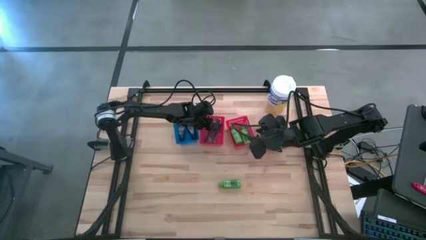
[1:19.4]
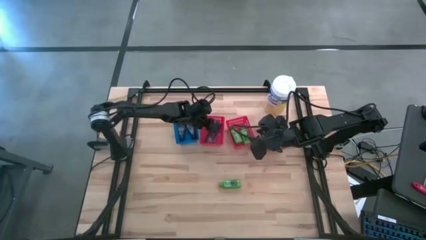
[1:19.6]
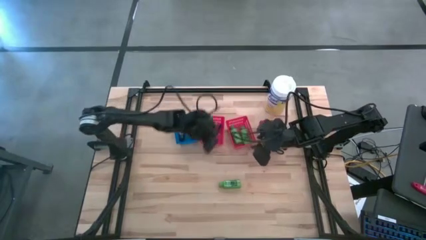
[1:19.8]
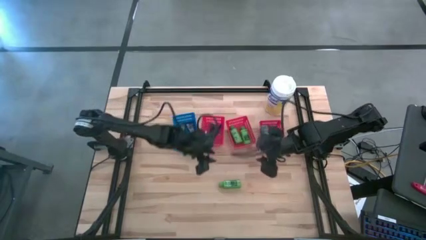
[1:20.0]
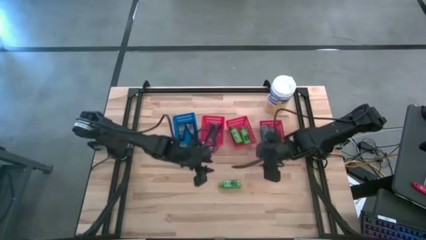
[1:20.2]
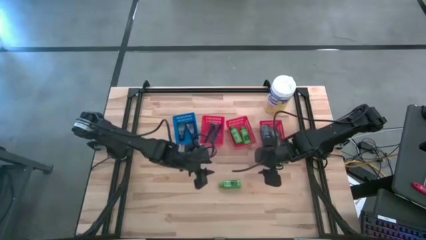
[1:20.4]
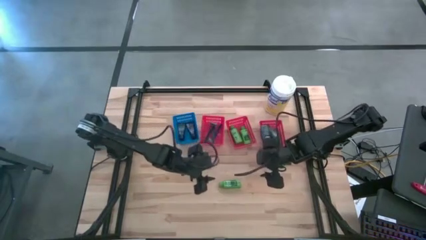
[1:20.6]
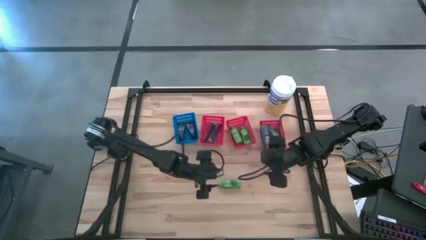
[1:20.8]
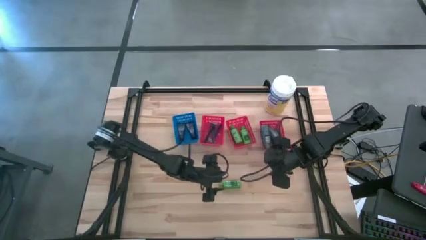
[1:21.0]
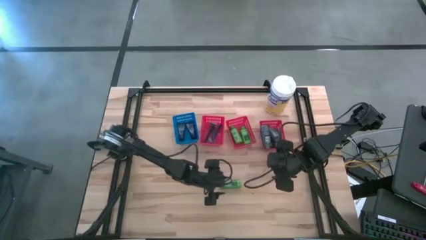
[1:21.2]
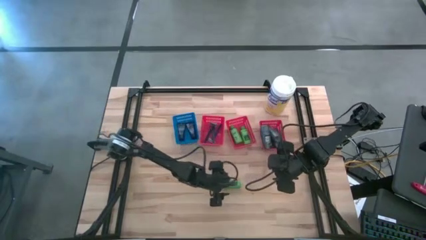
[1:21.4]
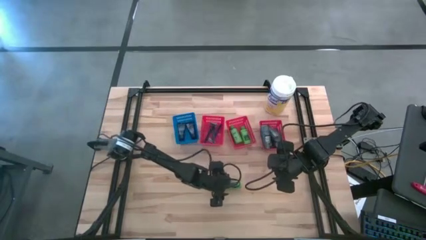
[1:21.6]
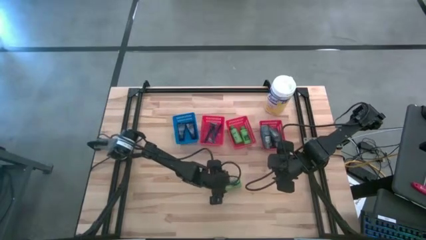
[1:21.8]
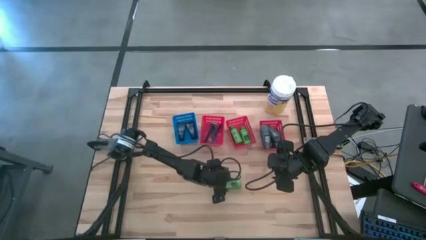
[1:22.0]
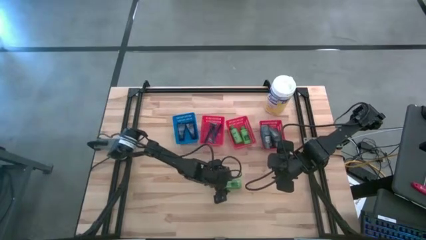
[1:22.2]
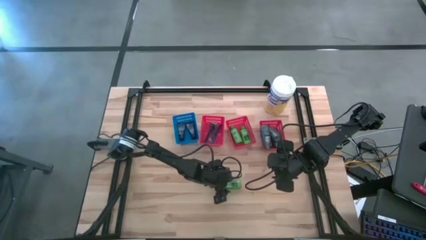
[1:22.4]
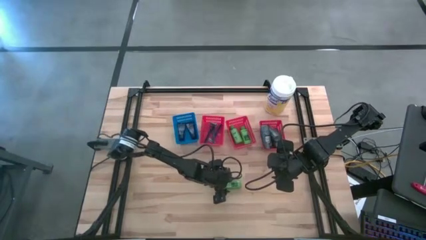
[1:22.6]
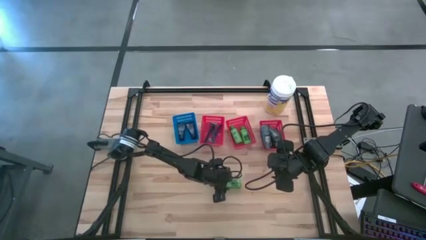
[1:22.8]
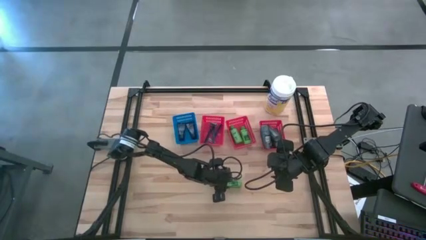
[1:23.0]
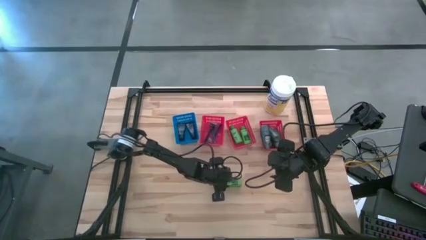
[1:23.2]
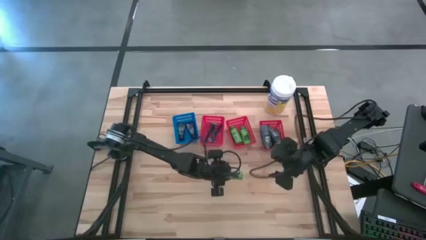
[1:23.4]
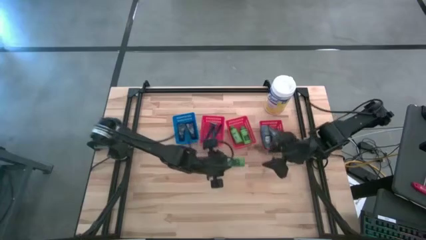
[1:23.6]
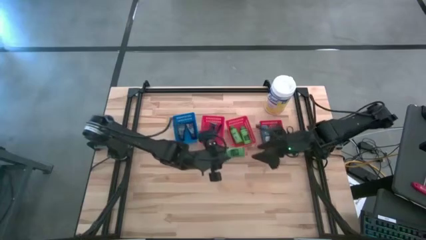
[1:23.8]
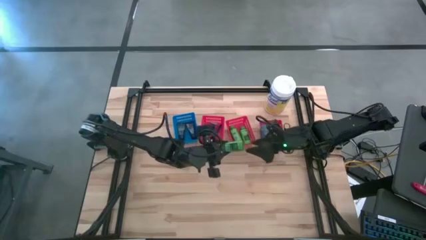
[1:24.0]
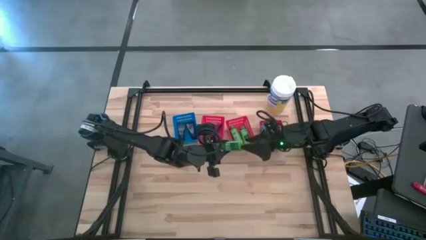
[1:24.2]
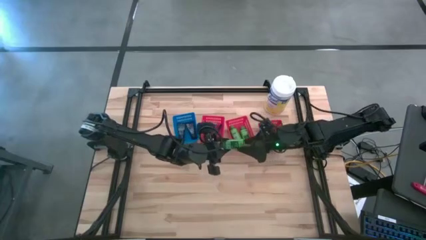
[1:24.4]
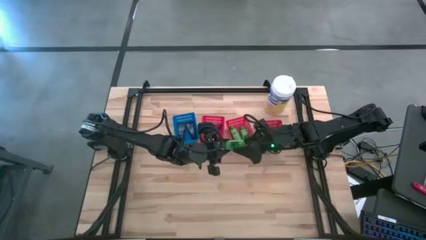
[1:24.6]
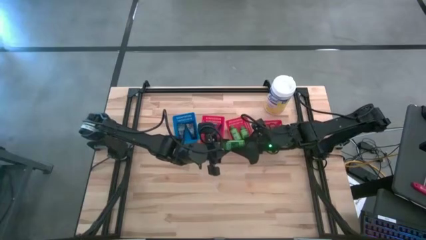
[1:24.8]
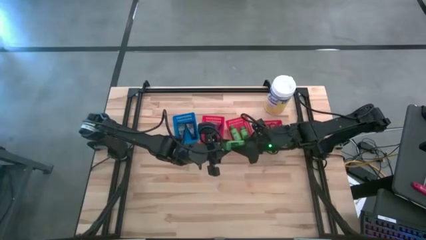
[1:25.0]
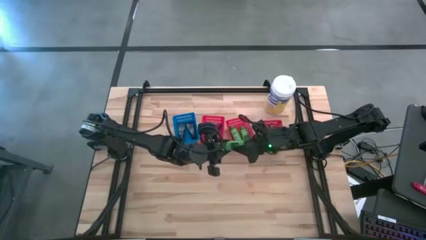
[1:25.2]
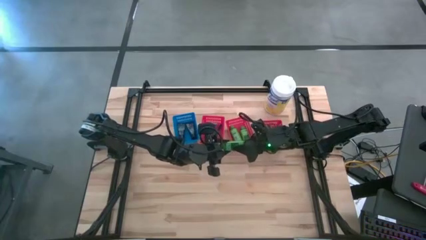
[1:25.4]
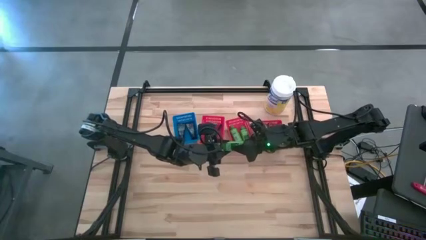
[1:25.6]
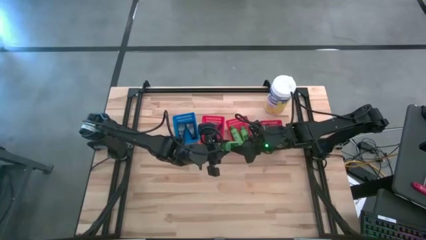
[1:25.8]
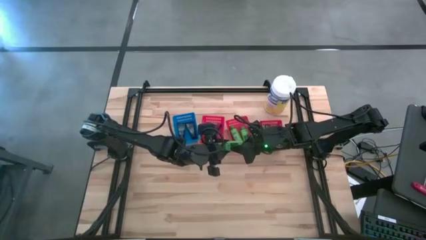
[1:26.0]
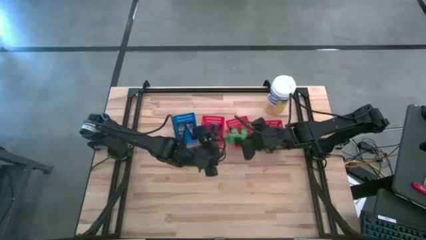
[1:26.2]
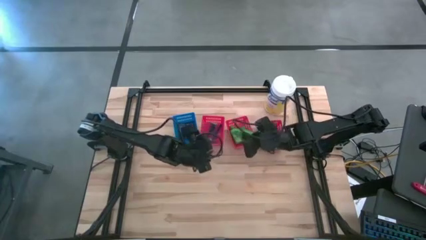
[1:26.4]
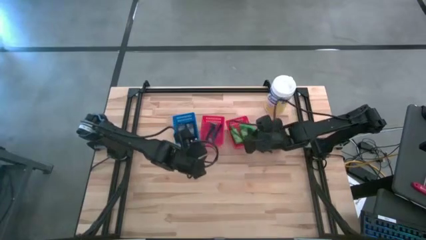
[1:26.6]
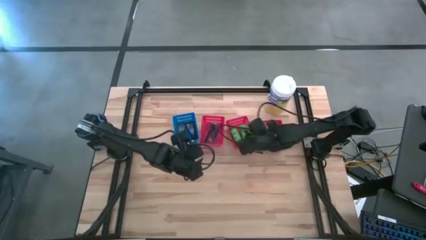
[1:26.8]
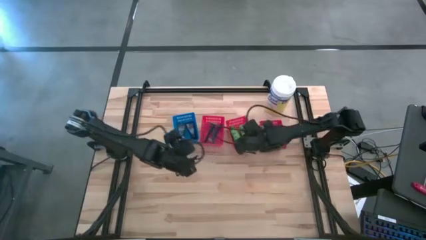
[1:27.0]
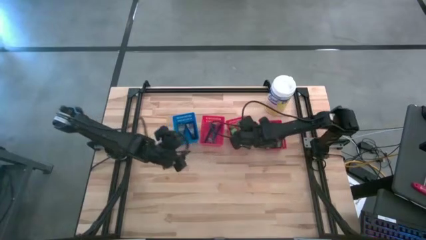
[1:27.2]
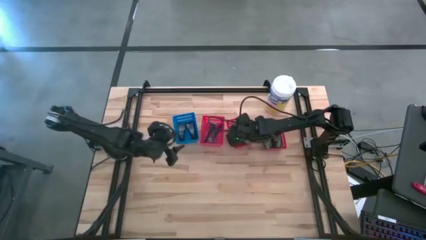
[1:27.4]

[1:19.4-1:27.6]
Task: Pick & Place Travel size toiletries
Put the shampoo into the middle red bin

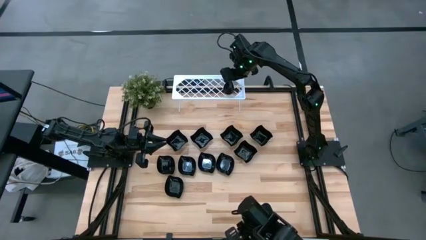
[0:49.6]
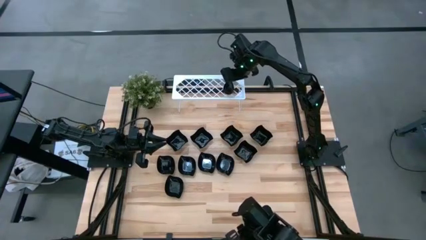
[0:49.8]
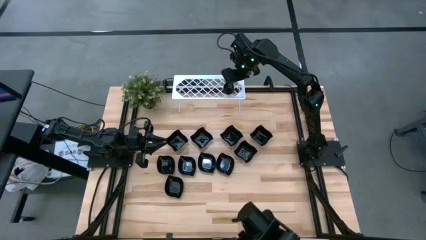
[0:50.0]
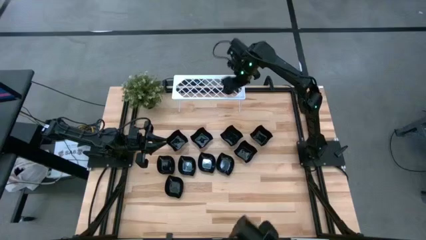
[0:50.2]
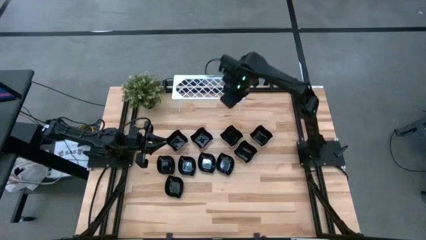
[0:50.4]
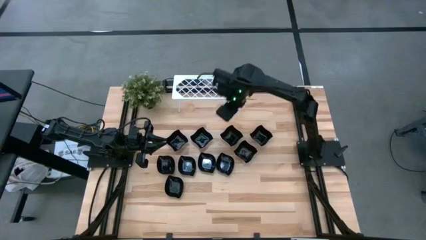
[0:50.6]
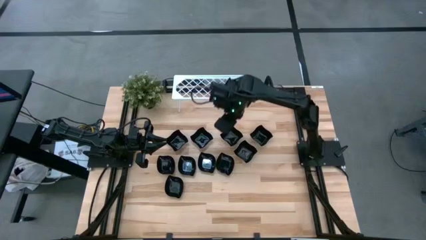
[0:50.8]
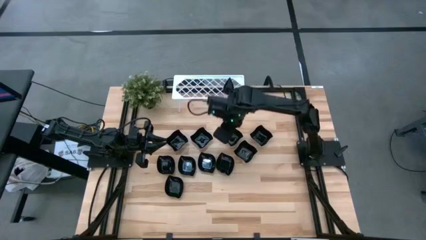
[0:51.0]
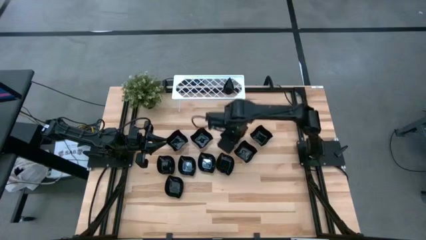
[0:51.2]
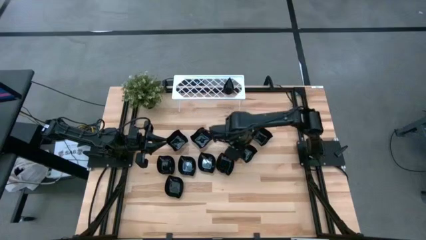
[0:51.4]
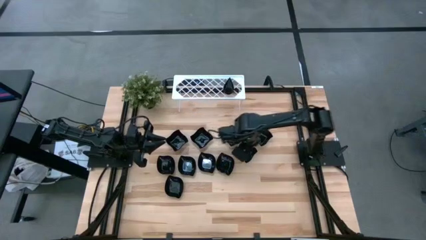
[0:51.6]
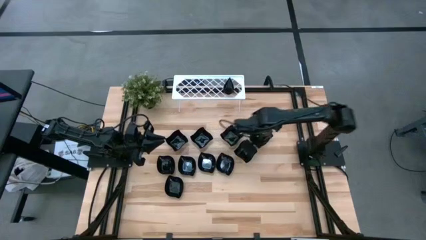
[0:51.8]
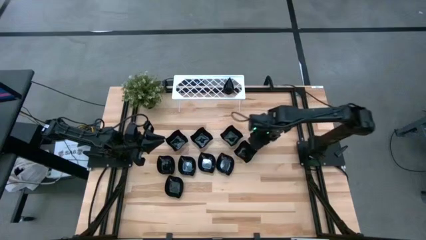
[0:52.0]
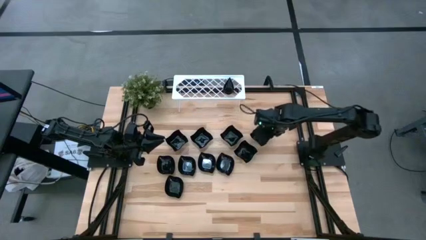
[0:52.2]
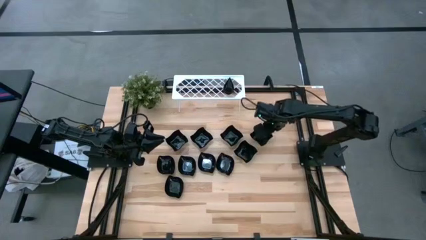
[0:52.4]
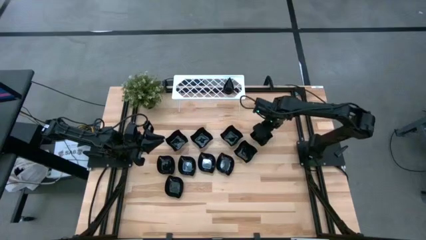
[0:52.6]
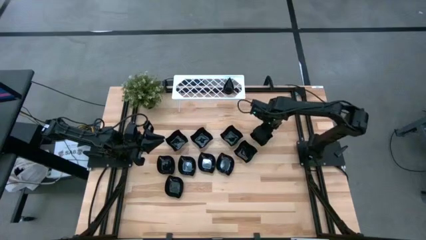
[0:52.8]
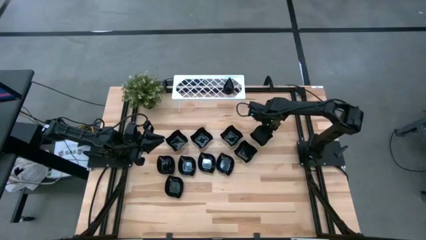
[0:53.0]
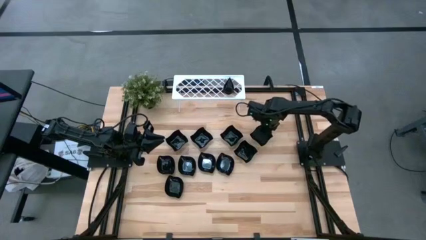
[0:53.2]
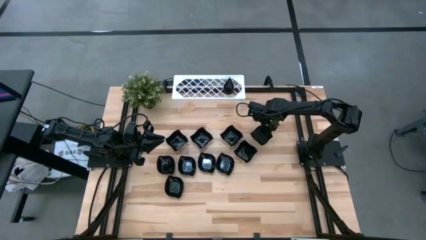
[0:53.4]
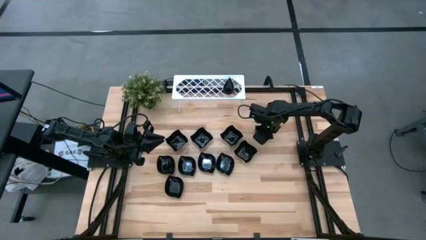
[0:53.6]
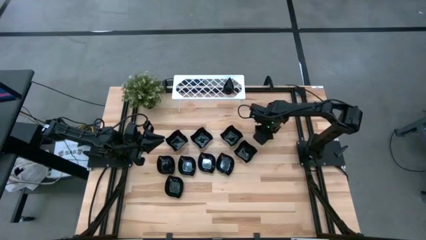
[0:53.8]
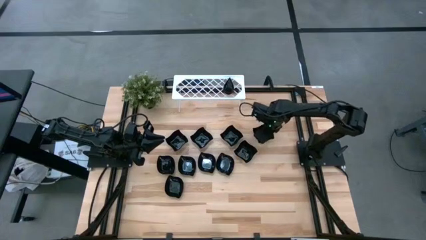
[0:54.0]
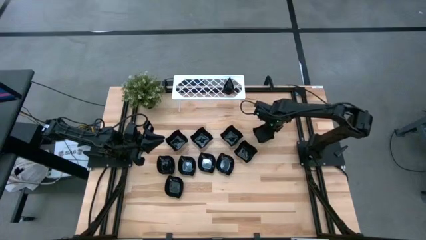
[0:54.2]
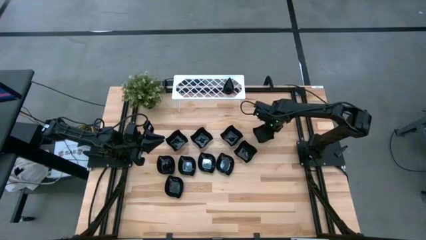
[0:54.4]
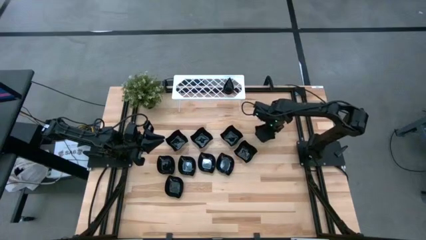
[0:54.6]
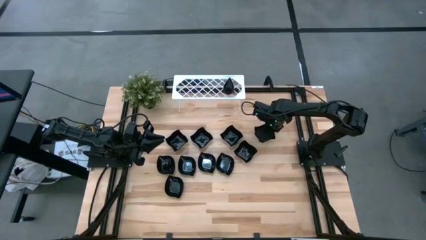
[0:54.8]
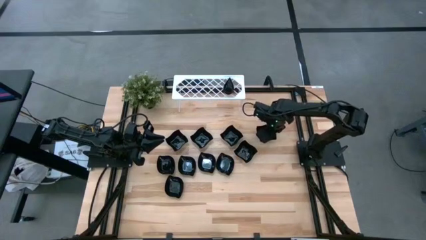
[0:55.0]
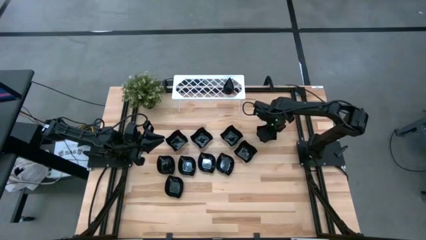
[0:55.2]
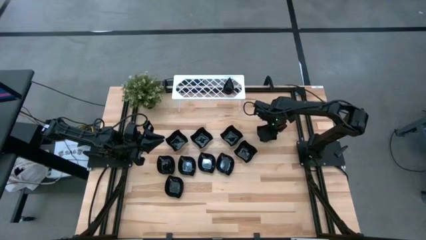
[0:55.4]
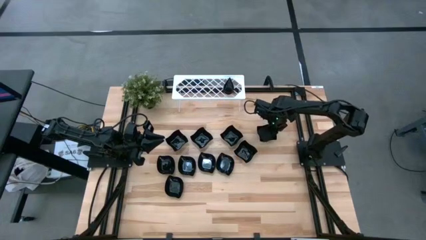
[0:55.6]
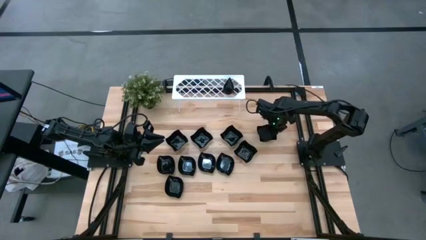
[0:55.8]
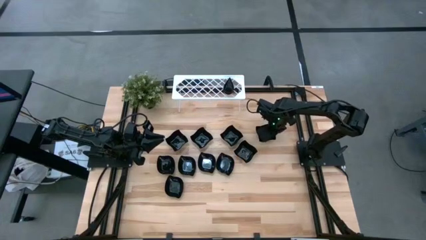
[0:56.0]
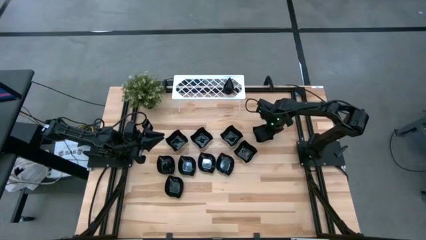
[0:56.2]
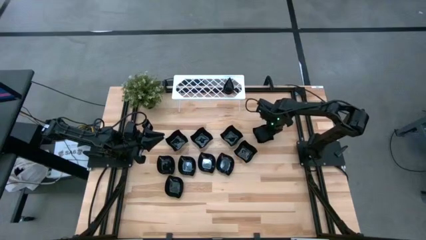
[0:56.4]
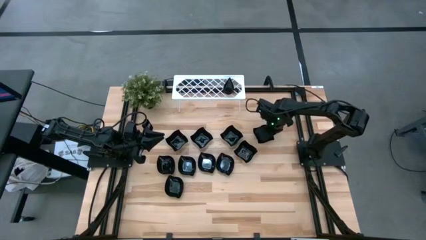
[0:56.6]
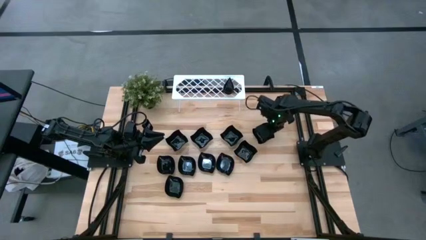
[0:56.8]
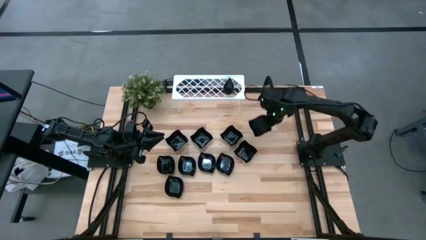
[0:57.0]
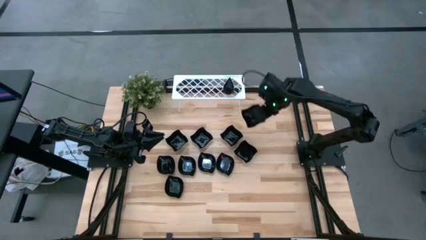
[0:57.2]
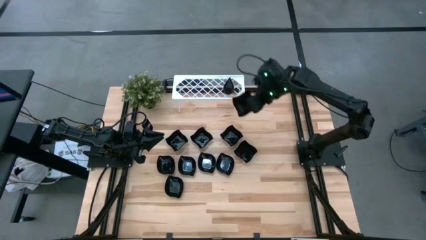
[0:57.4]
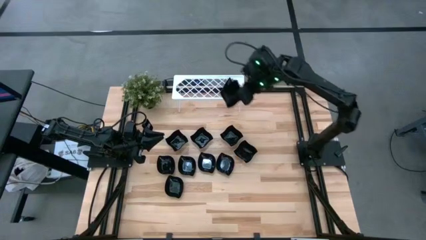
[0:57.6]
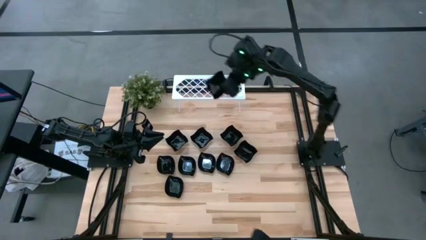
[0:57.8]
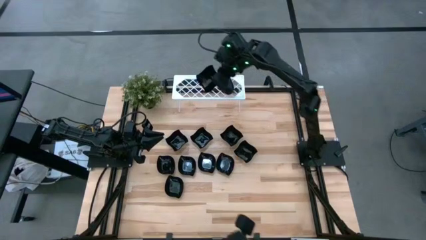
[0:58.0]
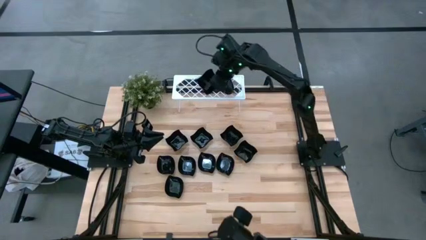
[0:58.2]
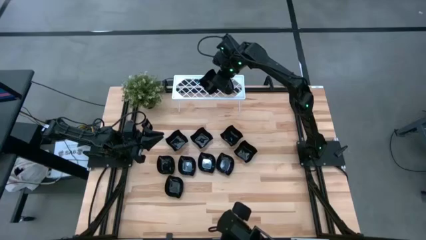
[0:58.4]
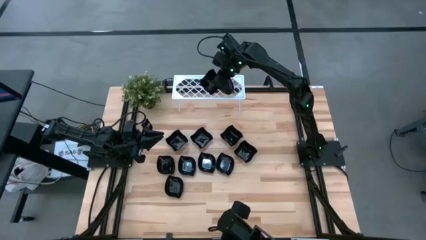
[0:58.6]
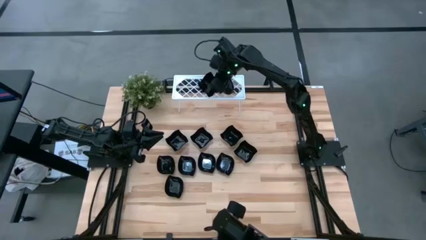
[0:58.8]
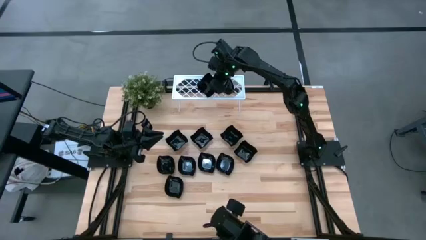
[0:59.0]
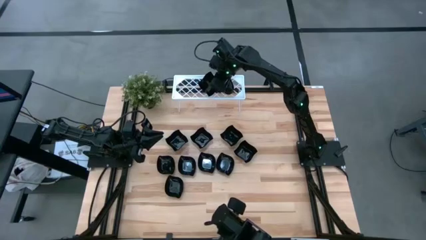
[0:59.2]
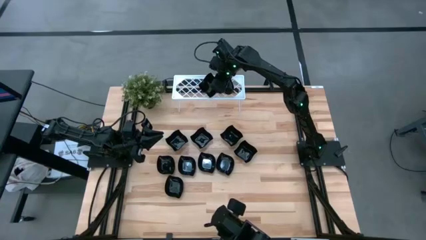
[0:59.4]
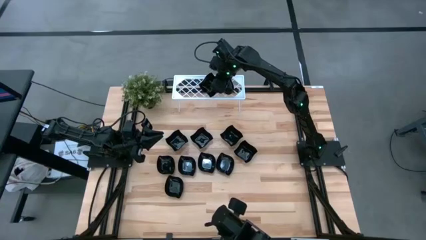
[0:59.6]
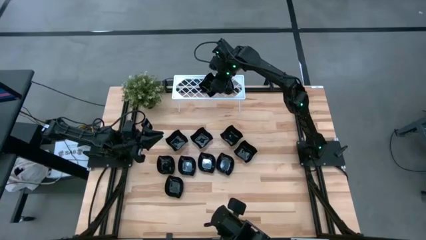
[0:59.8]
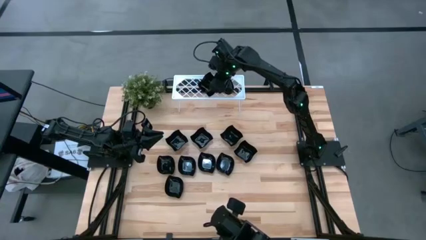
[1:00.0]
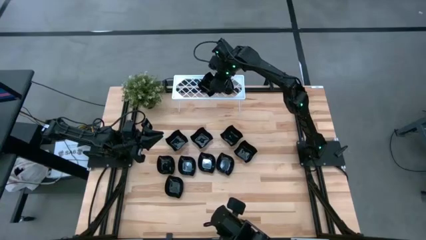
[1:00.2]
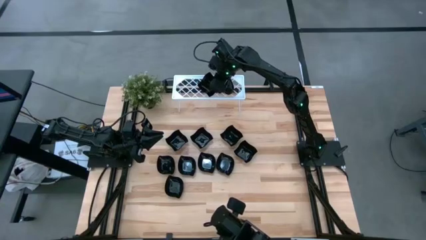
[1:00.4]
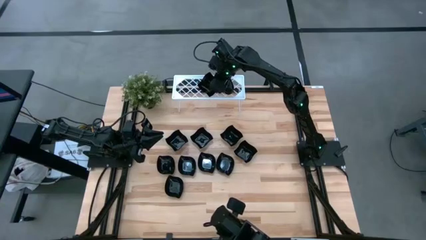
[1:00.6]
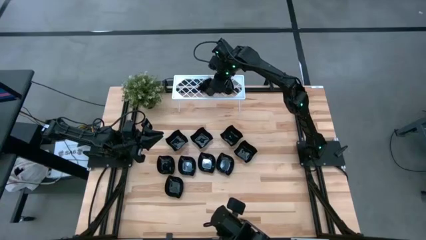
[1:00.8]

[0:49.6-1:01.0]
Task: Pick & Place Mini shaped plates
Put the distorted square plate on the shelf
